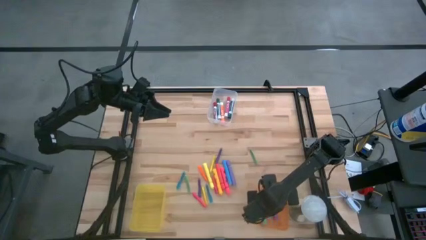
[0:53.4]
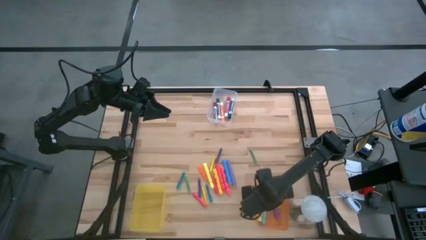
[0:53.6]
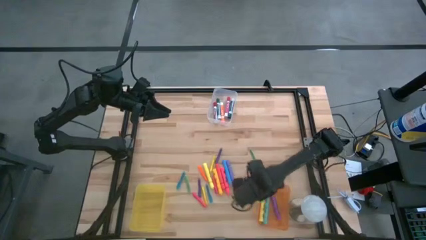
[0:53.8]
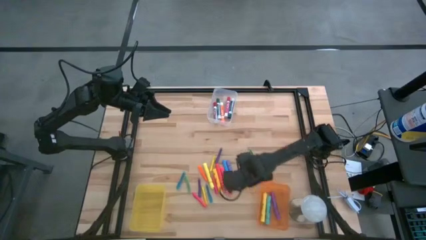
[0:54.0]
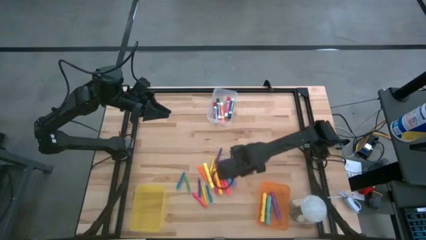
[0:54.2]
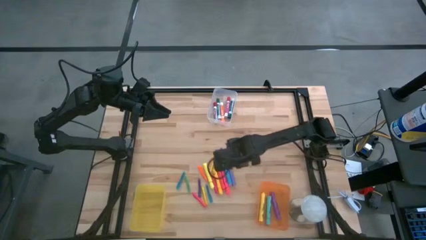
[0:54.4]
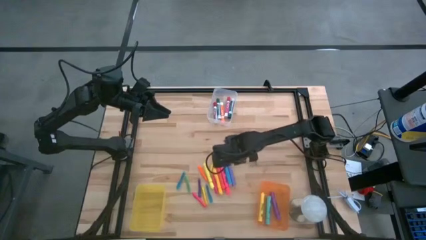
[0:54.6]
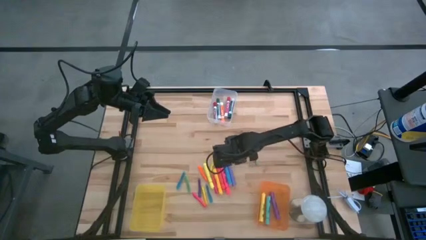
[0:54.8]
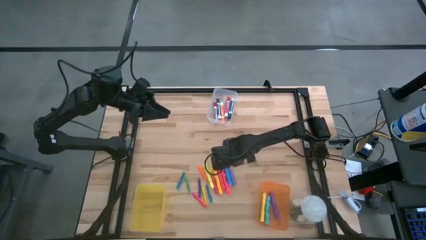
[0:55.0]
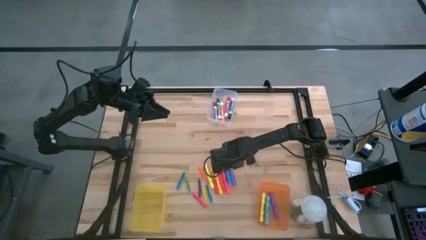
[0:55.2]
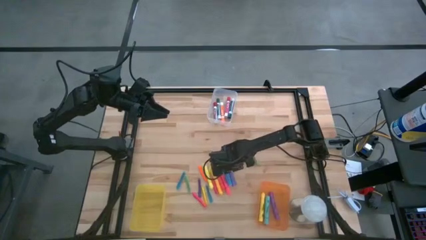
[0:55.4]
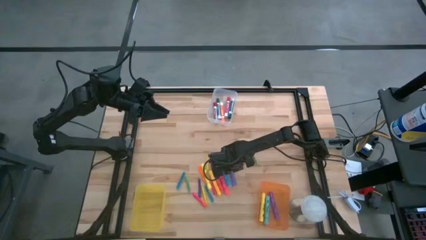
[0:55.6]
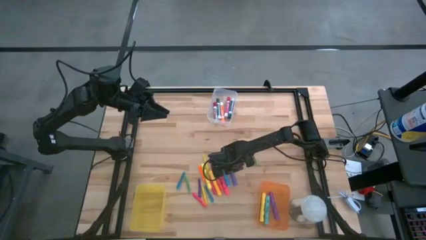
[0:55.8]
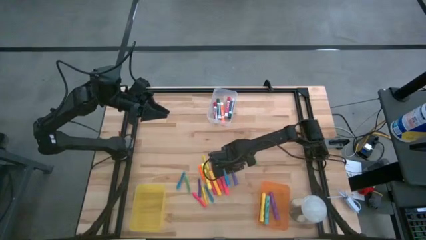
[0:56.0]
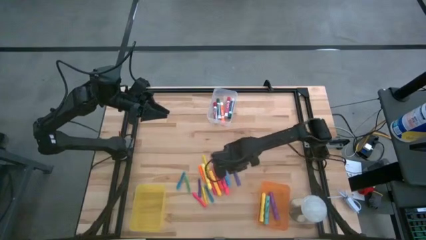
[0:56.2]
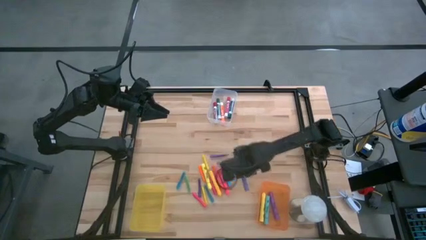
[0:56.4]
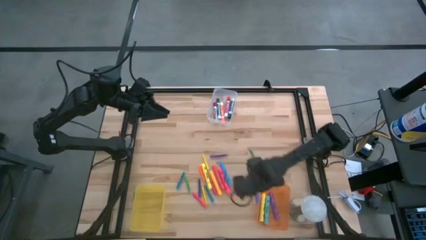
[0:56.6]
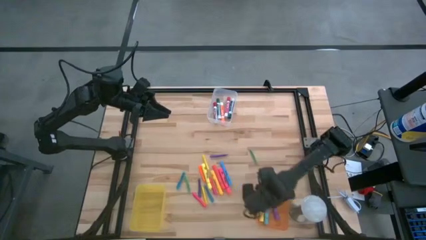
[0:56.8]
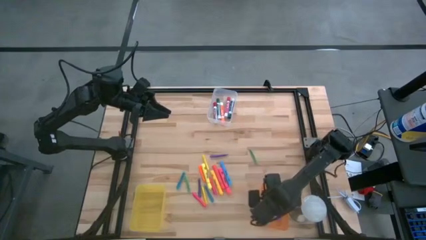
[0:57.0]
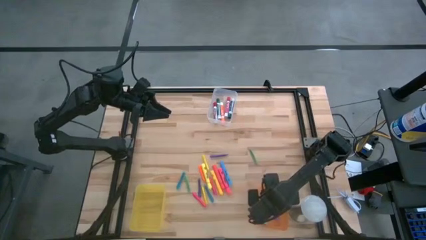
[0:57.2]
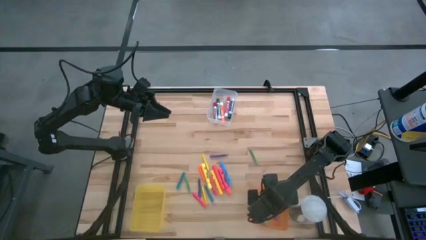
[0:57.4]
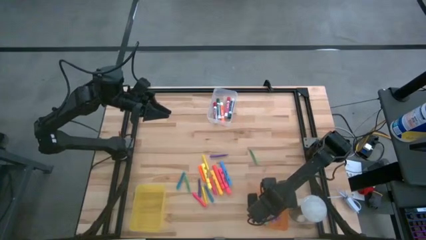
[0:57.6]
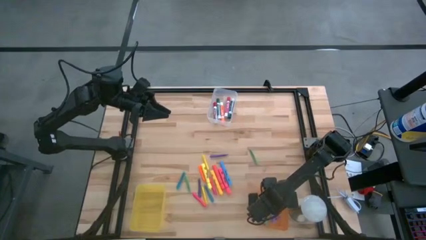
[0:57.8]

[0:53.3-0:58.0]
Task: Pick & Place Markers
Put the light violet highlighter into the orange bin

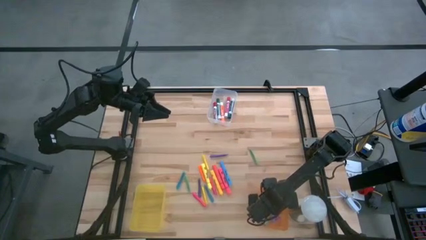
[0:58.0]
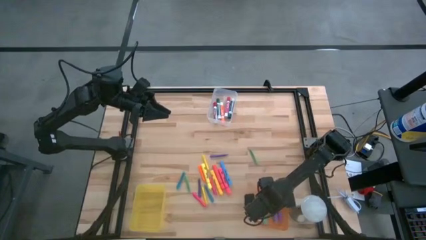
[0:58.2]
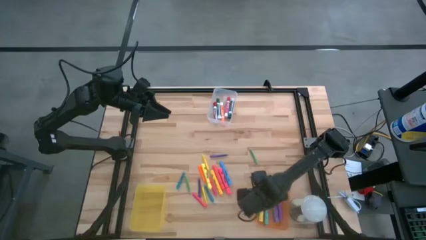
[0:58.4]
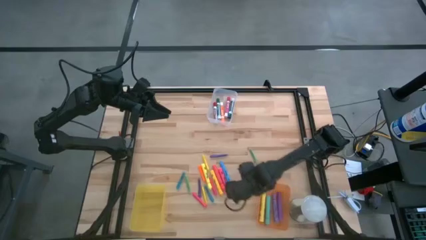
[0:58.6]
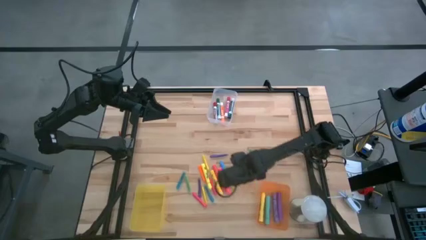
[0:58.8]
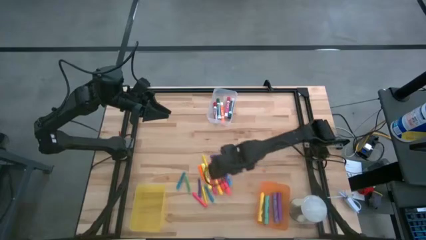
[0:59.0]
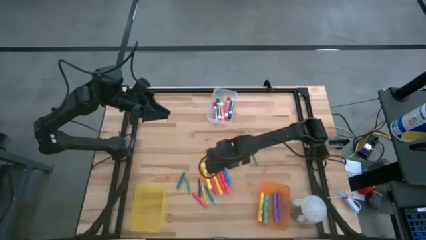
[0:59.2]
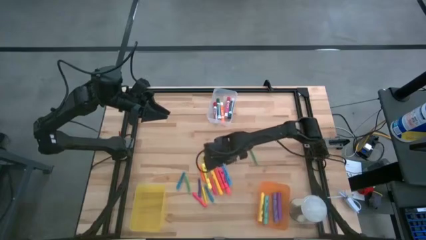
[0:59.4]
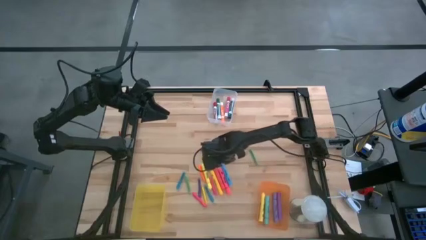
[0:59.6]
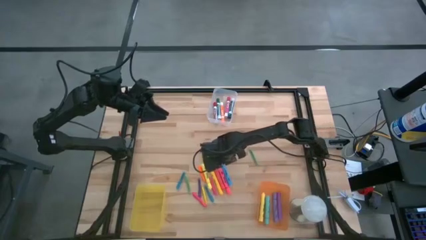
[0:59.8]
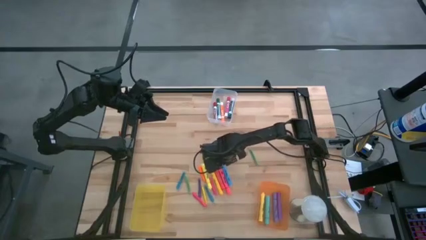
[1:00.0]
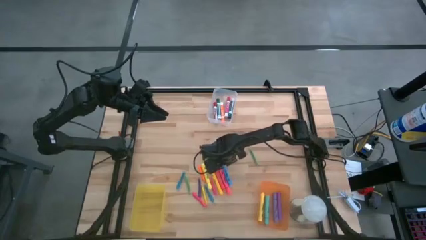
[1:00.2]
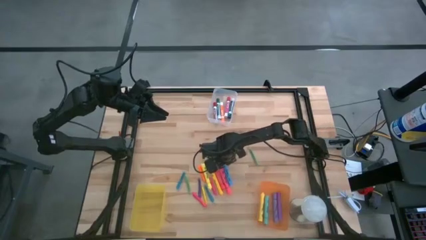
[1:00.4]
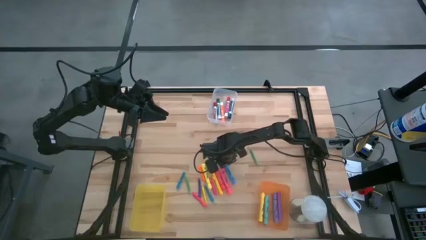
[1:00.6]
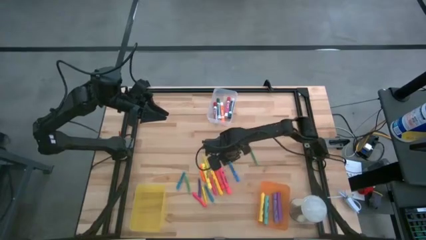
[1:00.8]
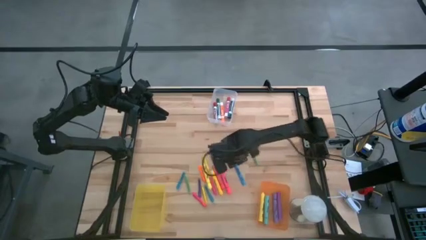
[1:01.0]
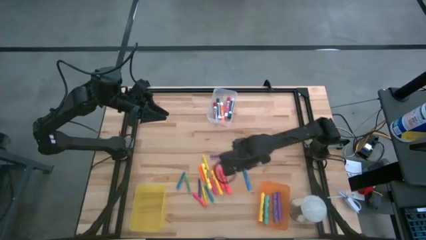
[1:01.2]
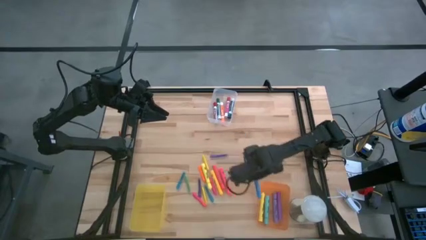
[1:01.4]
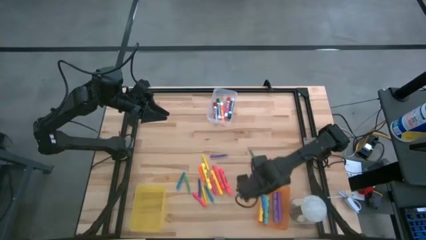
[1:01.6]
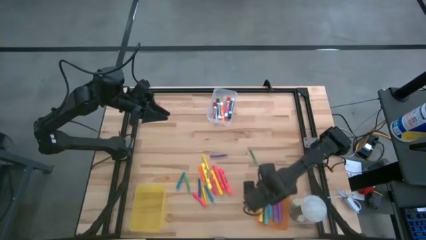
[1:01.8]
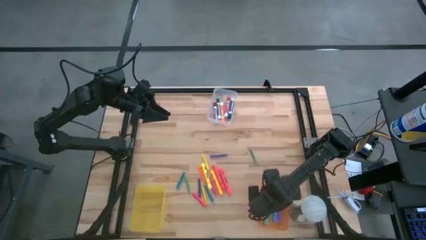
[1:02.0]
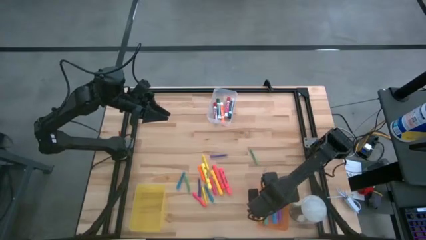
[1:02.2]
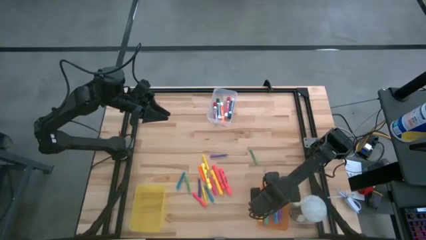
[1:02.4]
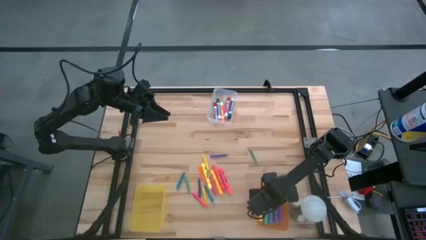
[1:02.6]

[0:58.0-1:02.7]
Put the blue highlighter into the orange bin

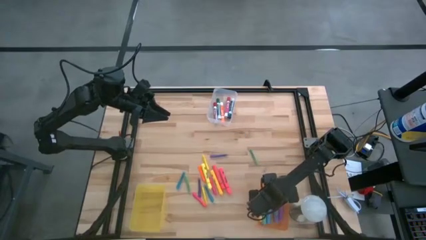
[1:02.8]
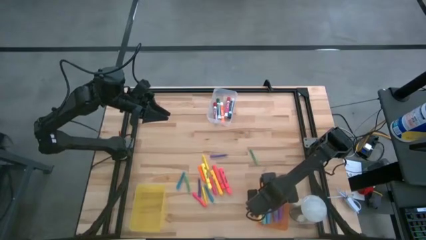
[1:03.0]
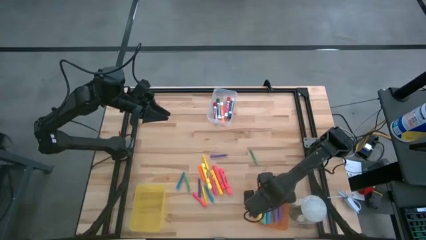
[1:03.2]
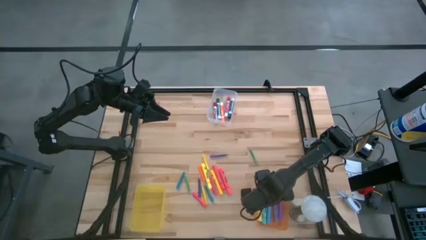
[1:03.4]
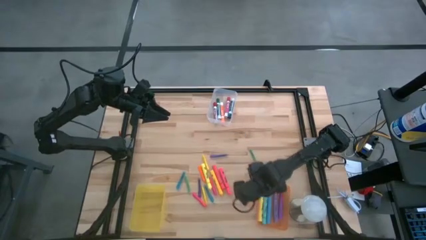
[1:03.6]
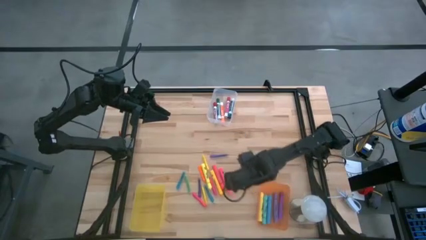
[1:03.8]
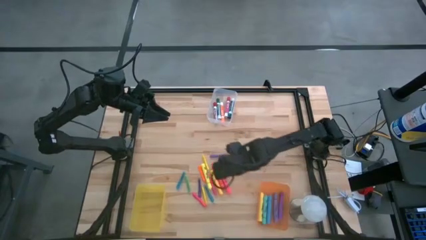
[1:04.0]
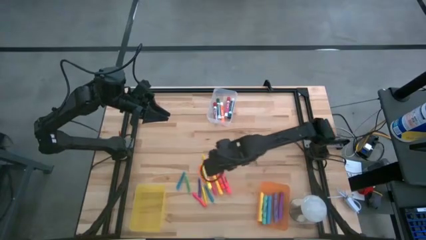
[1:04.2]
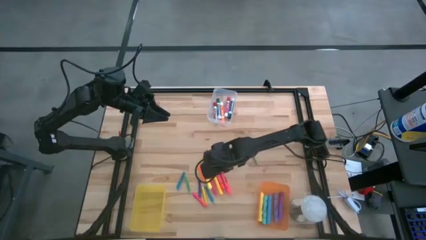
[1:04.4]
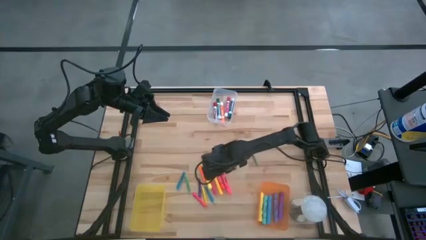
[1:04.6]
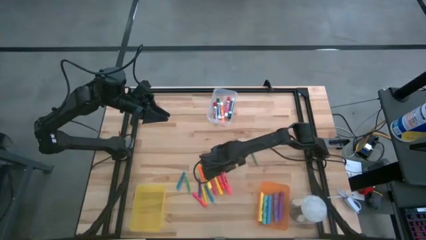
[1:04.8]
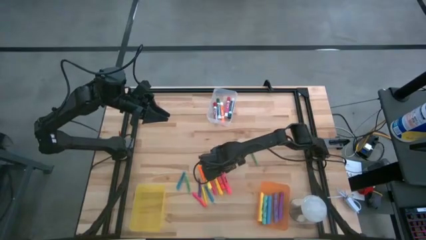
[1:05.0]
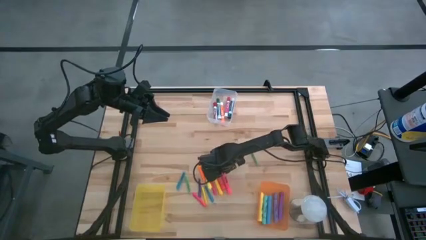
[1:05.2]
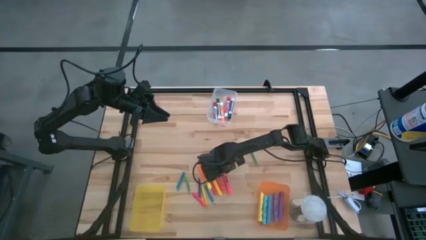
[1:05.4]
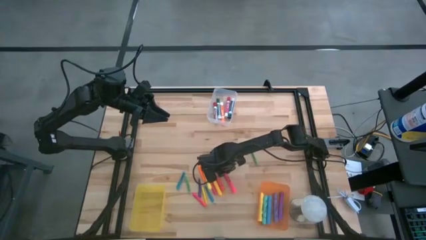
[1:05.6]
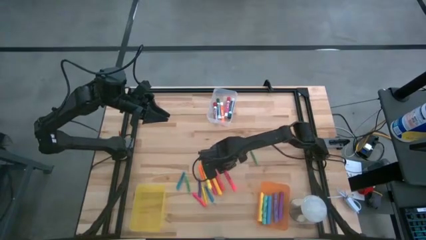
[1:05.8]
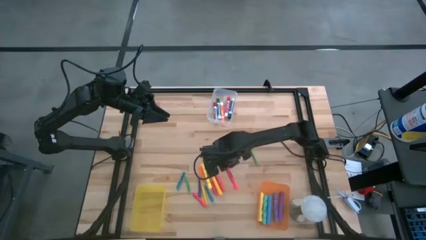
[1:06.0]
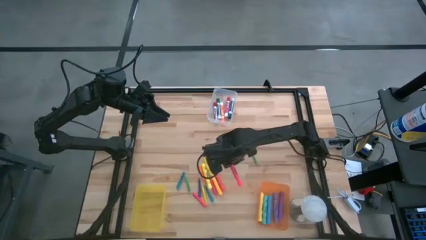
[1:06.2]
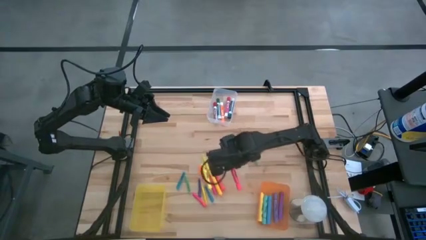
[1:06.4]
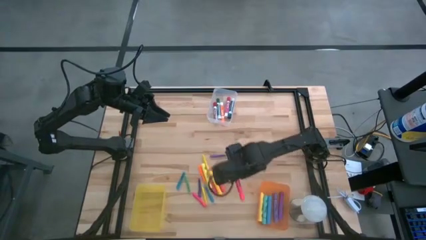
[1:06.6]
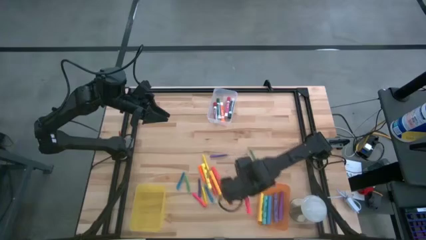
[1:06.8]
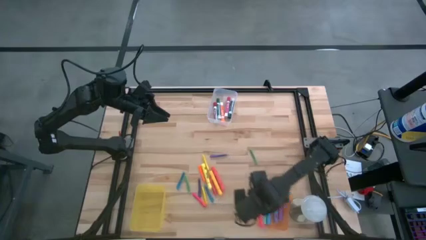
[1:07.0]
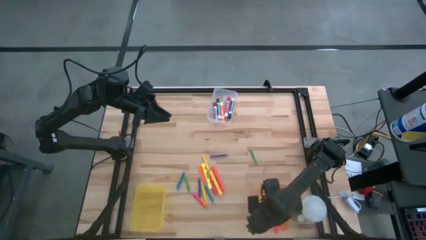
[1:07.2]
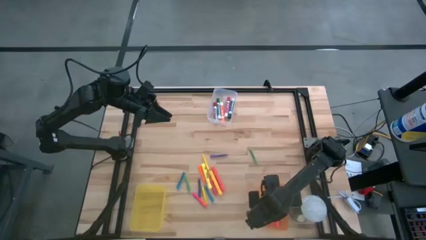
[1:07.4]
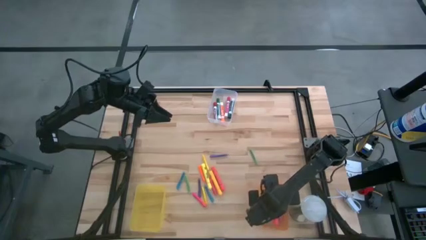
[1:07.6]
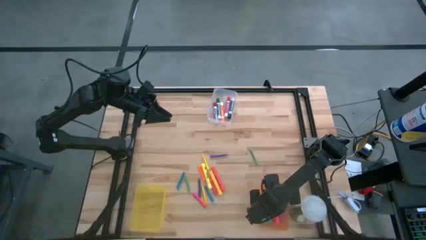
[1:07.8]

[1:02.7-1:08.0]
Put the right pink highlighter into the orange bin

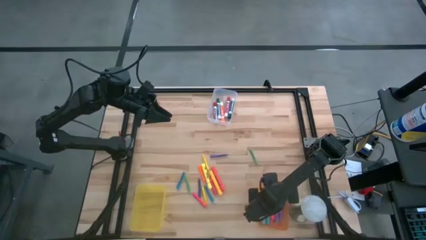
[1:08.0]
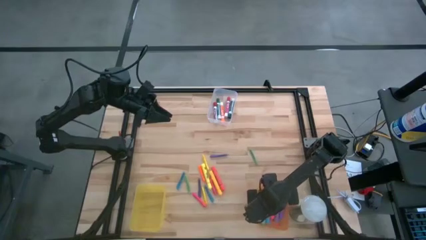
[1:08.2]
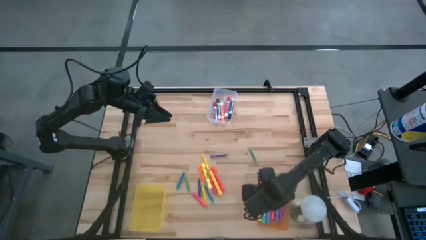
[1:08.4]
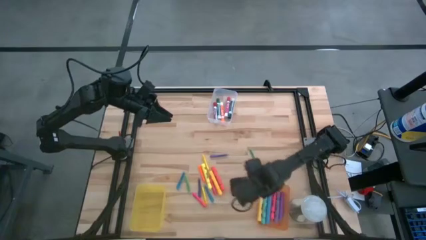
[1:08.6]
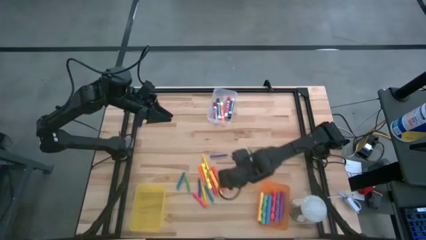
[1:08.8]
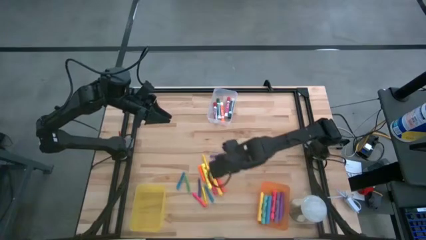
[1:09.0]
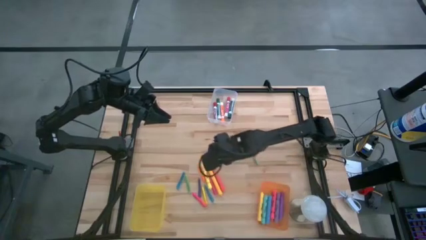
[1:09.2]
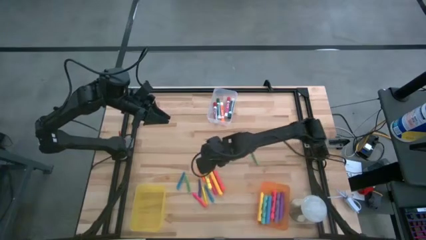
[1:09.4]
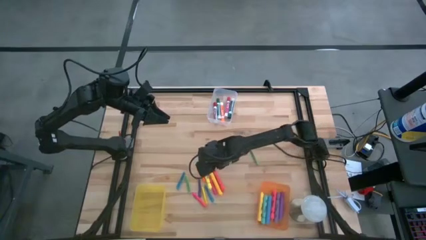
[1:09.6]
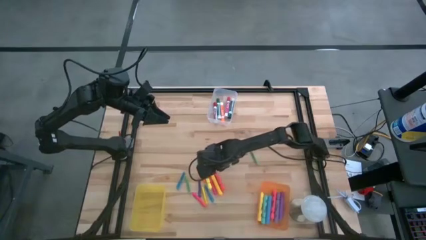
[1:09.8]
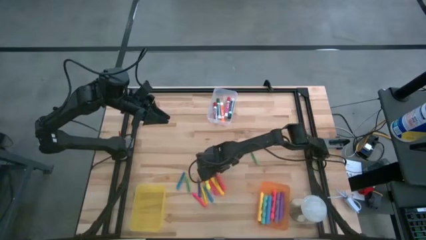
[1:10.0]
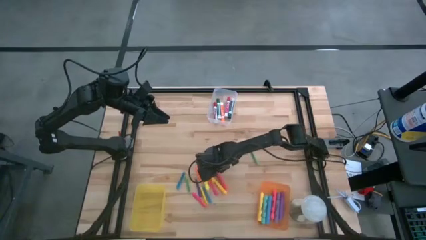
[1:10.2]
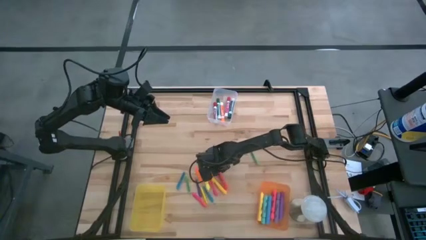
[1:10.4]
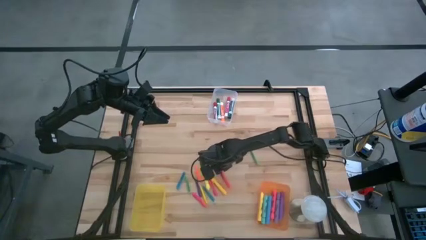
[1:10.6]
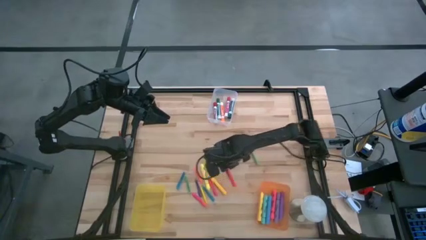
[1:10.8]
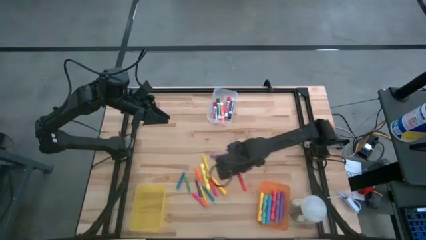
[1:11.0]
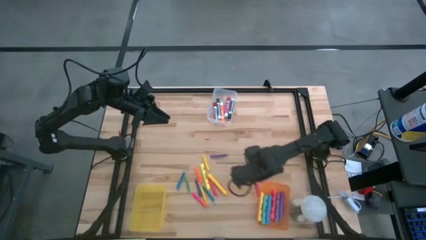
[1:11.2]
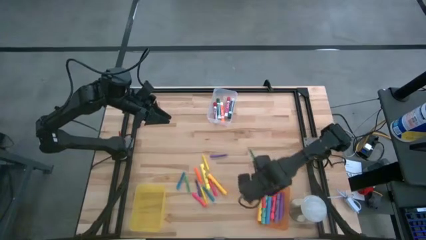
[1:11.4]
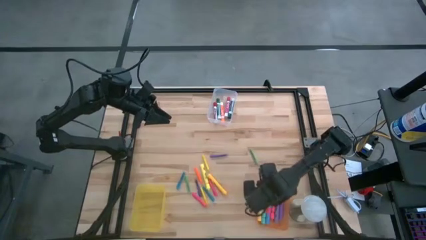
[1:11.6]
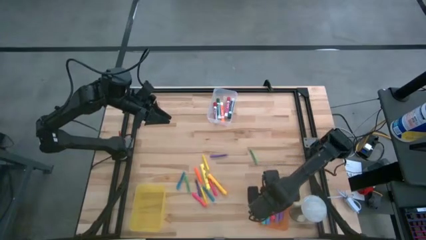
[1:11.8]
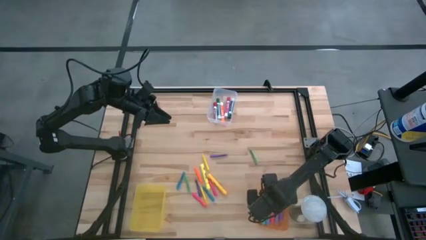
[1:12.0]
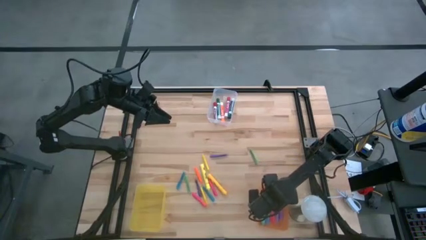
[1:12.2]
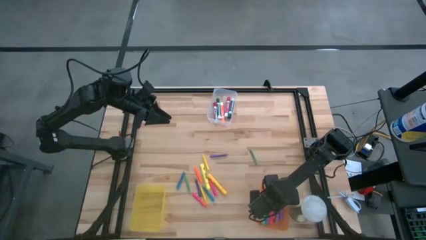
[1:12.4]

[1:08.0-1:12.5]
Put the pink highlighter into the orange bin
